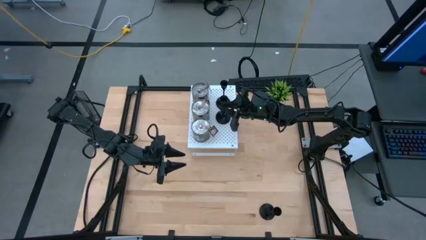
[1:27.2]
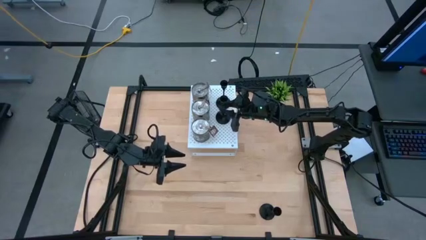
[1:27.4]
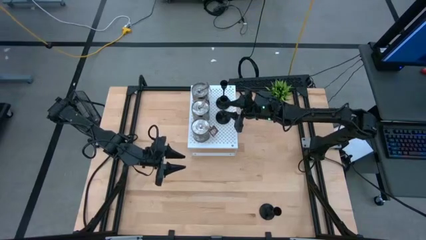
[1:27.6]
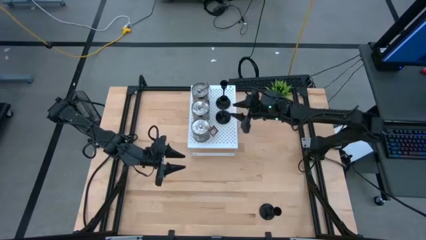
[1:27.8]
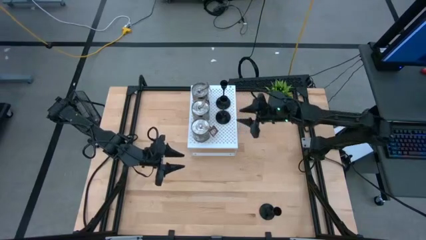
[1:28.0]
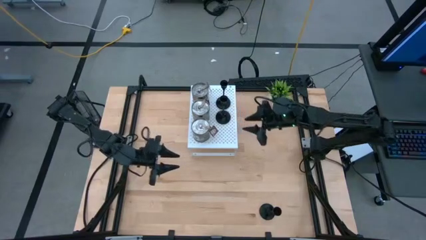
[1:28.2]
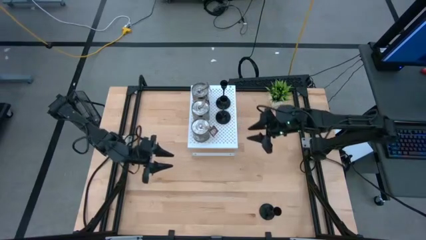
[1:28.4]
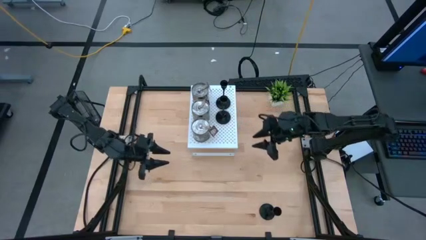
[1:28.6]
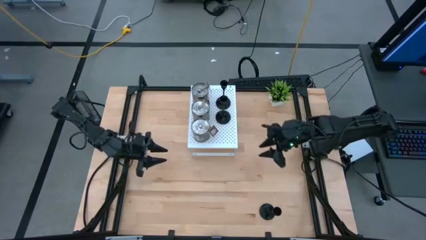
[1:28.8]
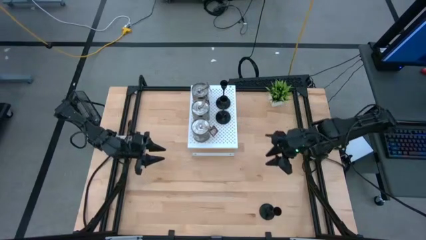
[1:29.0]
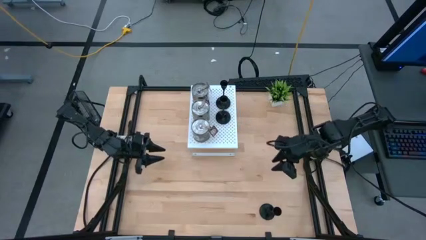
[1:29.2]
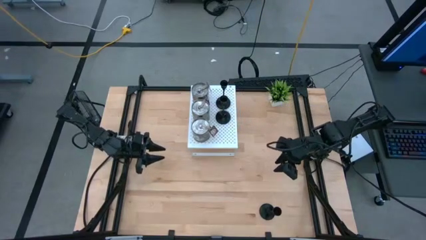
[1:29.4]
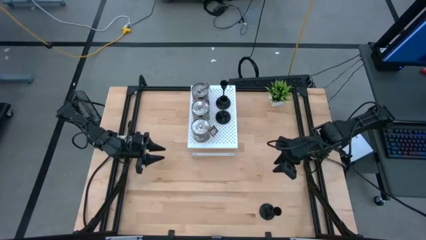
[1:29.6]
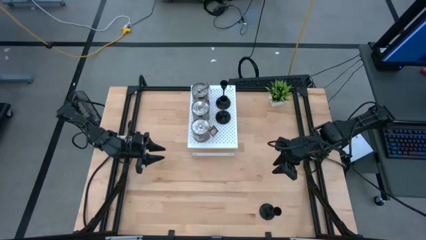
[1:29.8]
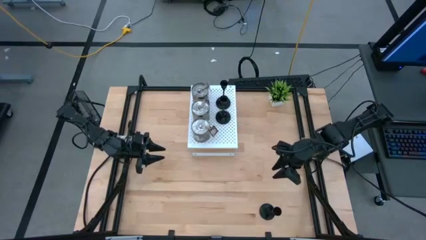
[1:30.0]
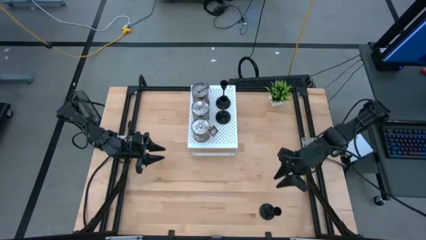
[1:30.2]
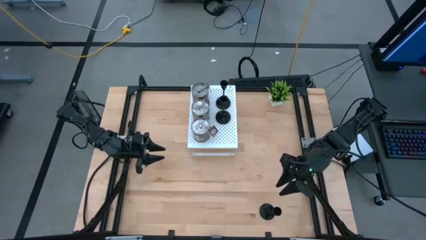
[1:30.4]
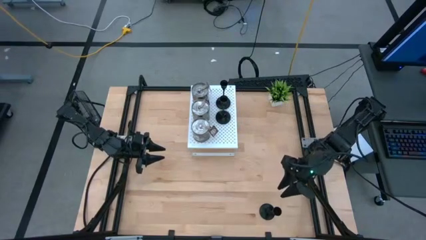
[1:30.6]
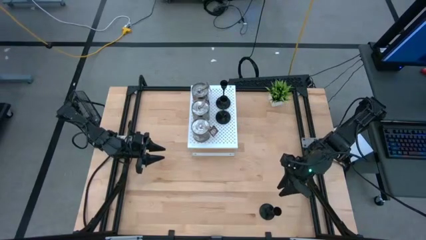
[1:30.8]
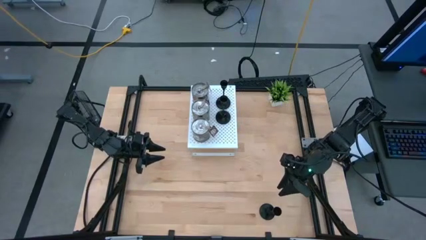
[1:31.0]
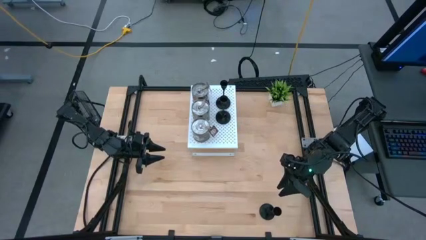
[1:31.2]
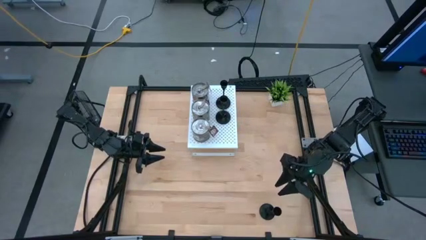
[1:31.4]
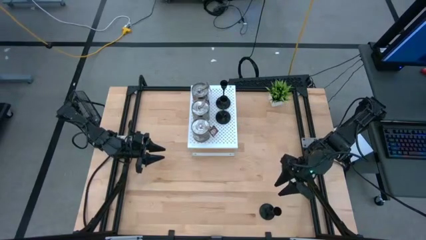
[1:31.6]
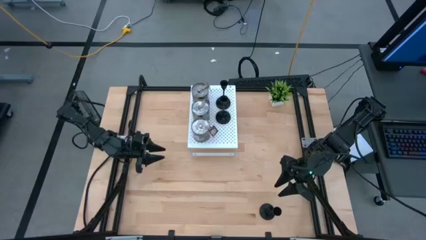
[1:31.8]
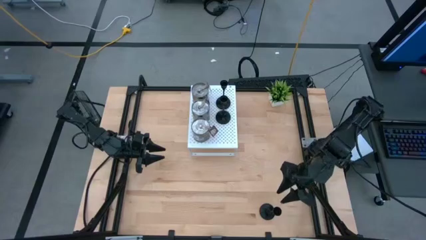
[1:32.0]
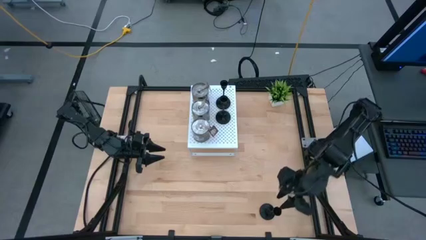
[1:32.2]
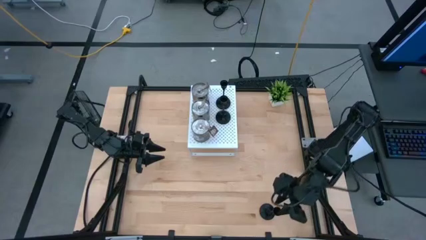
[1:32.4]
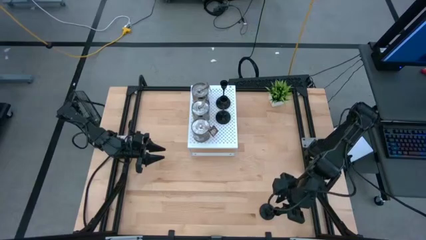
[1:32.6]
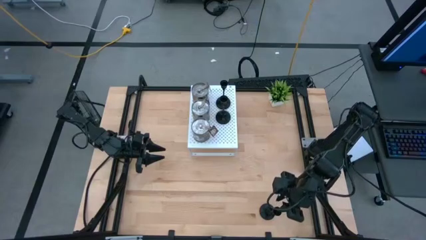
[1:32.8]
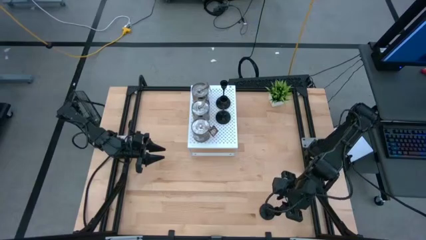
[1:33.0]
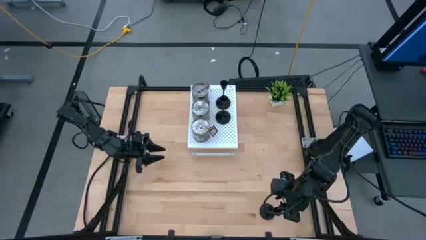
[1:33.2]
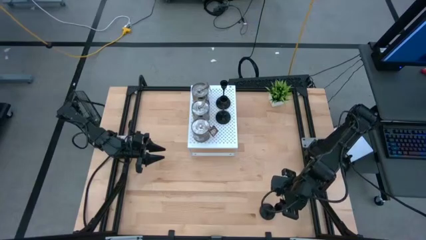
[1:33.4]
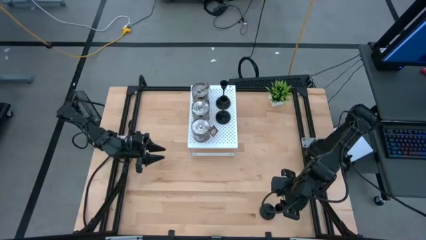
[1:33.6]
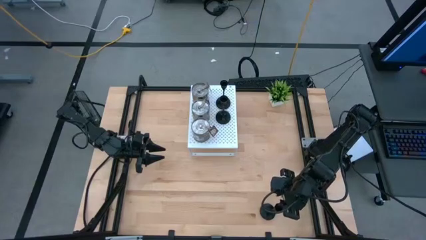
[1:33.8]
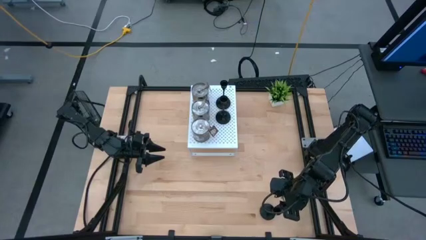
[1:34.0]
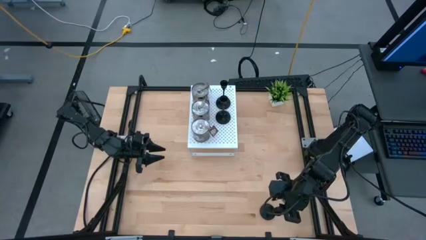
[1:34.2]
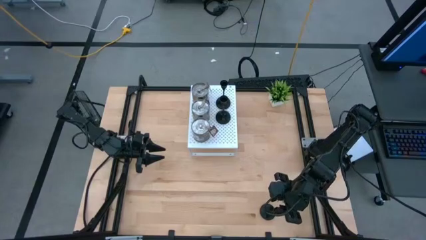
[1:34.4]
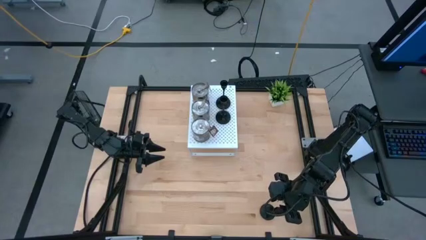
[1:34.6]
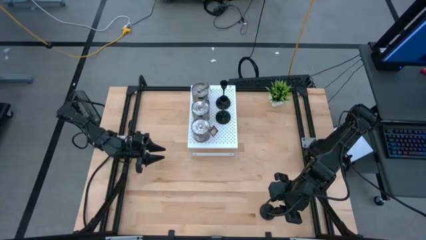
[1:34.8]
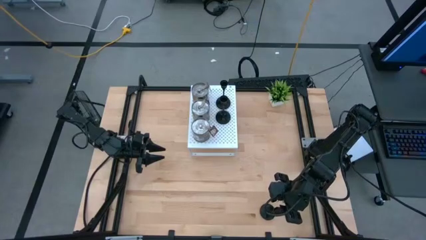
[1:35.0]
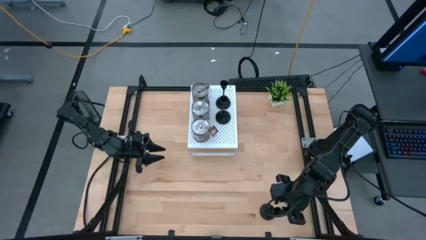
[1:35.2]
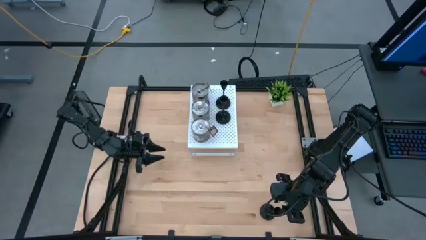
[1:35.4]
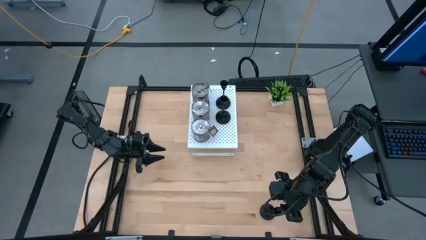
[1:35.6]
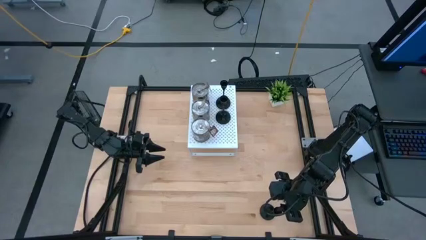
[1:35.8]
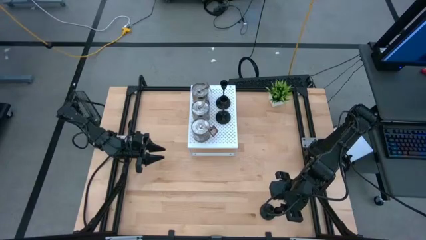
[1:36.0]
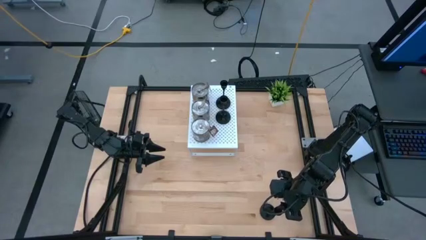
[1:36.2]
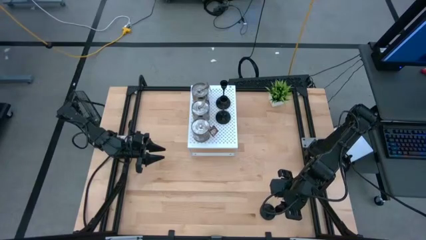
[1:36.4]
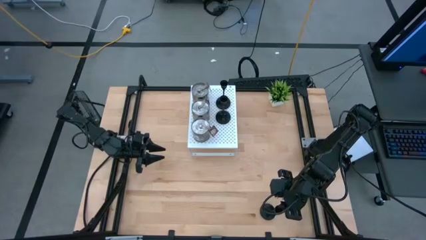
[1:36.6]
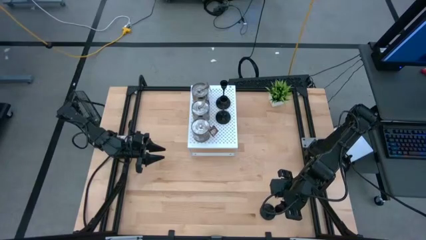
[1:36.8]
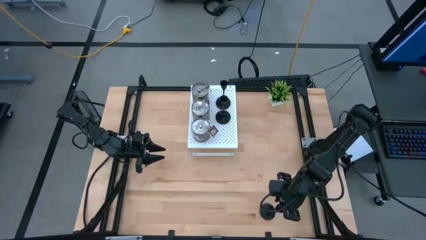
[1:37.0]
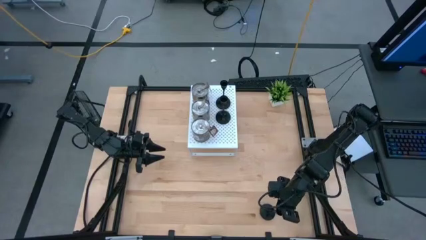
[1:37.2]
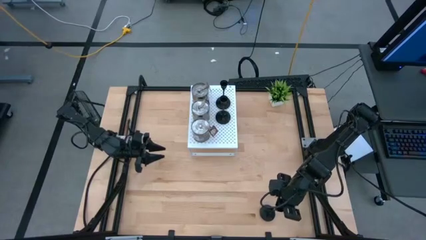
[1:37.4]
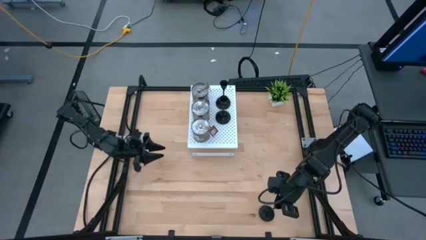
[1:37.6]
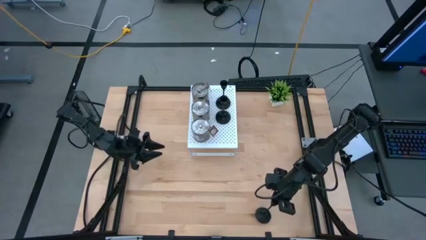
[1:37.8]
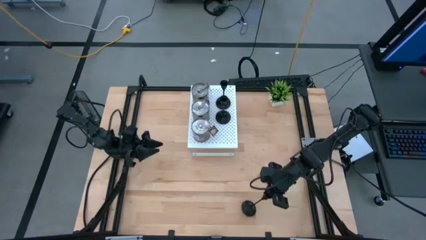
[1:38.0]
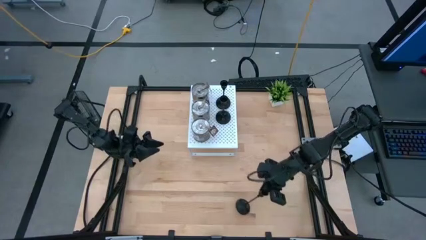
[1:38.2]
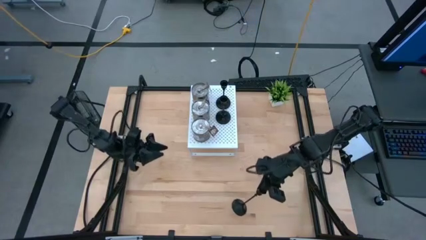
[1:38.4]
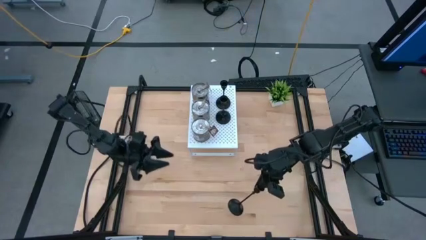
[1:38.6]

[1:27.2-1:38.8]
Task: Pick & Place candle stick holders
Put the black candle holder on the shelf aligned with the other black candle holders

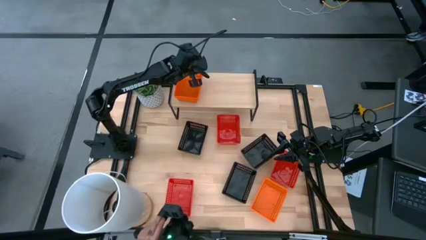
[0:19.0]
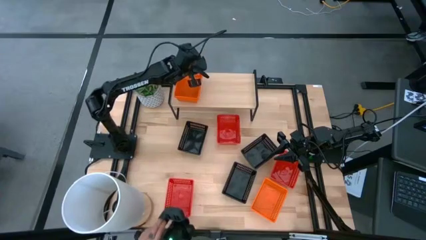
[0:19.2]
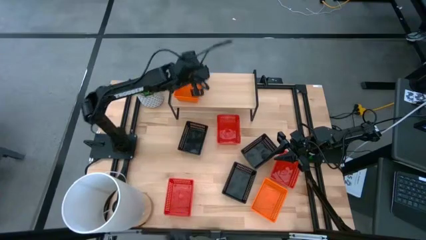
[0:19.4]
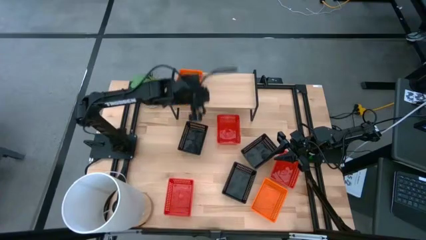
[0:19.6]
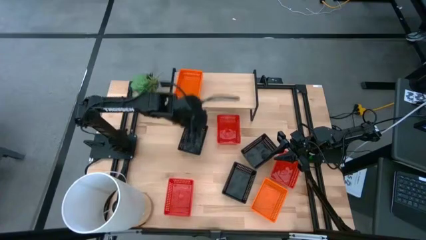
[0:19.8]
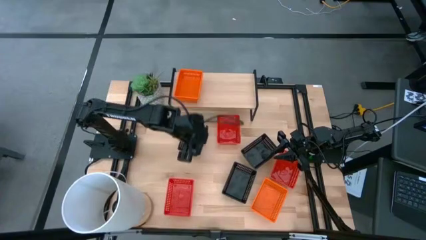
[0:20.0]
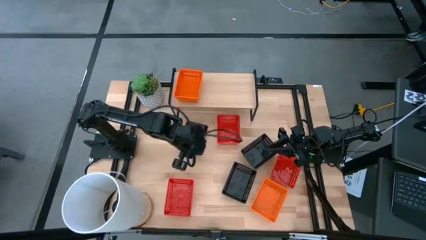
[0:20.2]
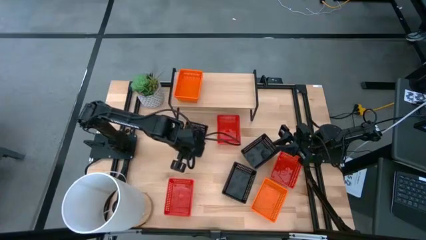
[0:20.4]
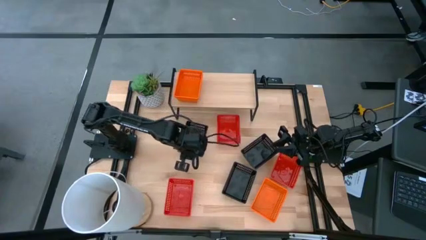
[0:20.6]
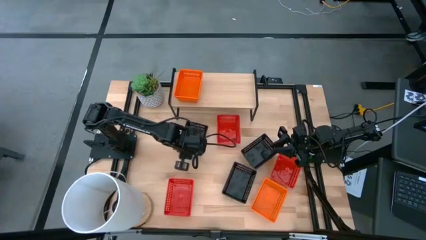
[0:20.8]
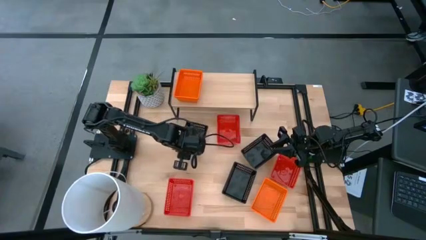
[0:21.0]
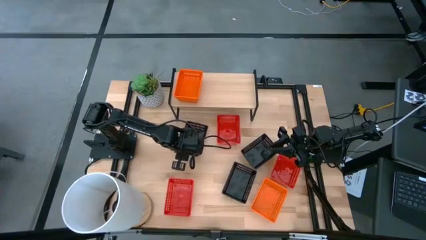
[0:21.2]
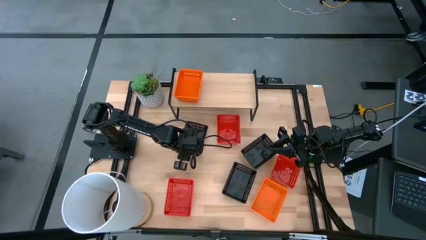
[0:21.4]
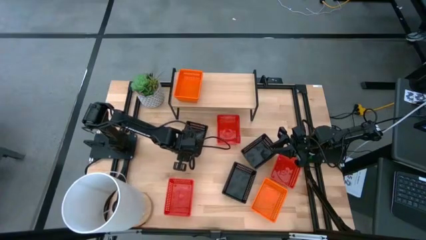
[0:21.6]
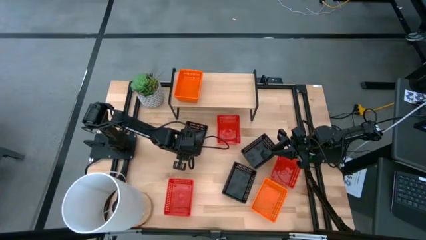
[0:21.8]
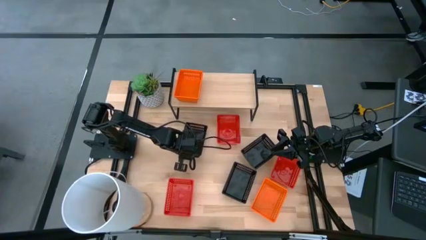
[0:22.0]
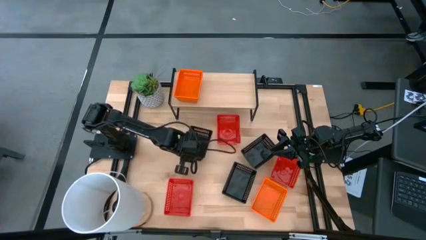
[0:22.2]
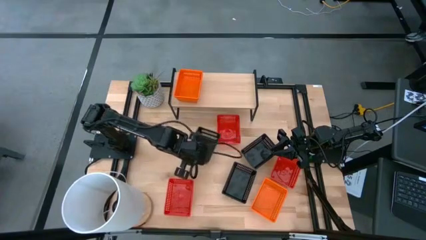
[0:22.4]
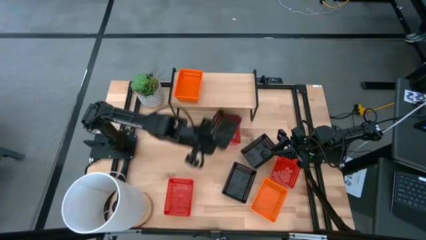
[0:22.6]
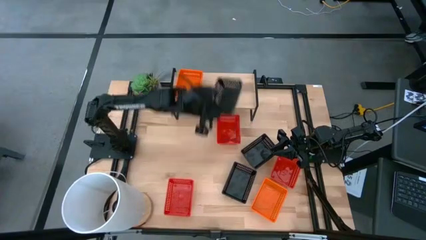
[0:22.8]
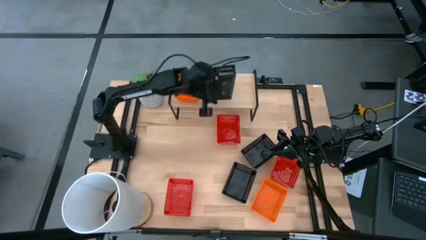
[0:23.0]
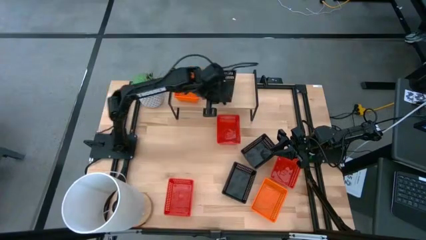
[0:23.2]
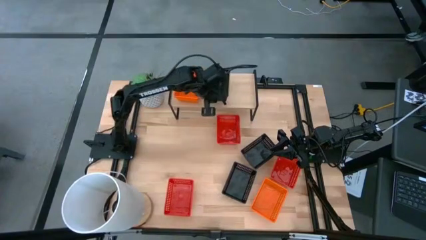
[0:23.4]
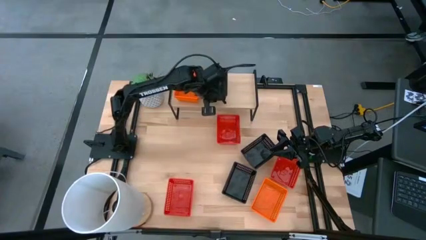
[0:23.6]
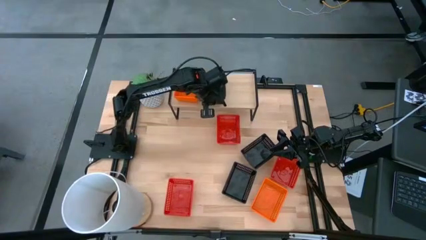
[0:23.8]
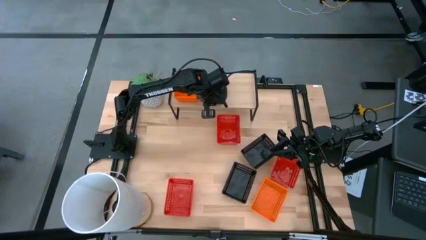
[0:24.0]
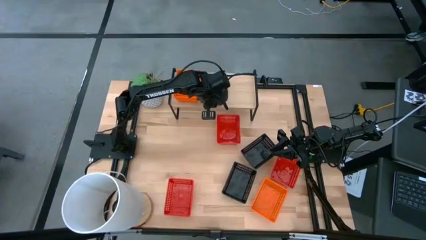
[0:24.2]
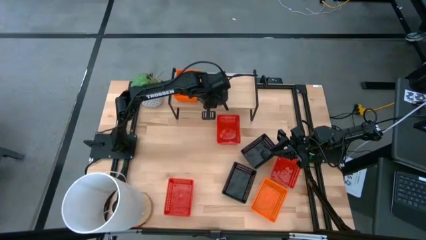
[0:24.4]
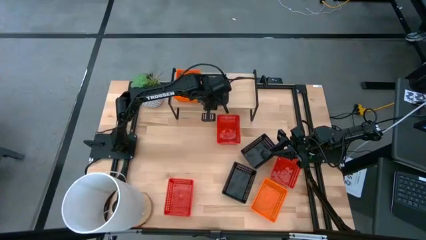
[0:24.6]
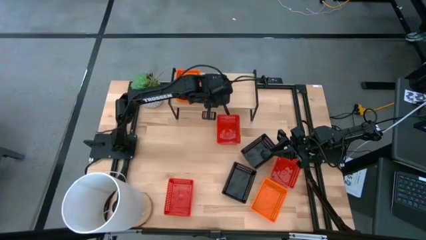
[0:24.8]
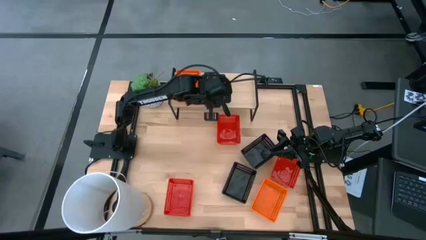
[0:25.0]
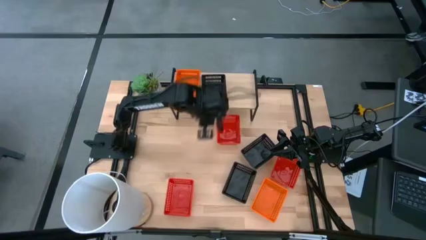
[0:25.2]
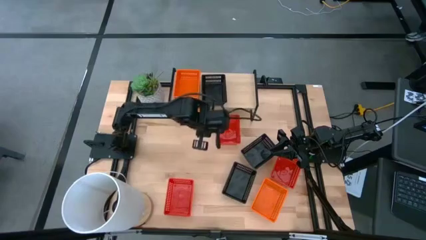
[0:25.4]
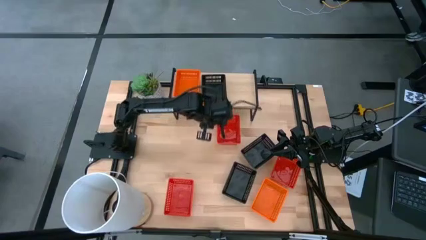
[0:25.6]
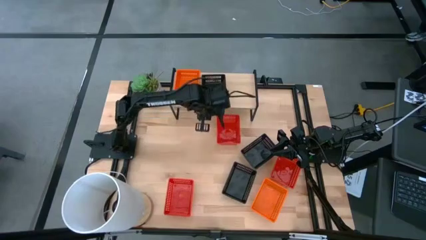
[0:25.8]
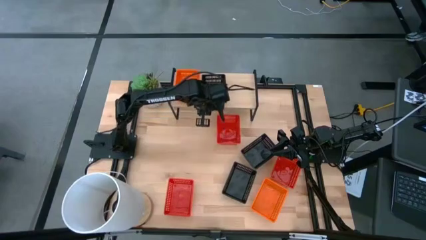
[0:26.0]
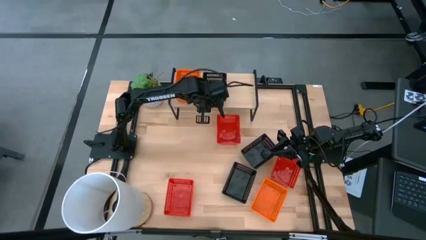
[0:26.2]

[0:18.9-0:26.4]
Task: Stack baskets on shelf by color
Put the top left black bin on the shelf
